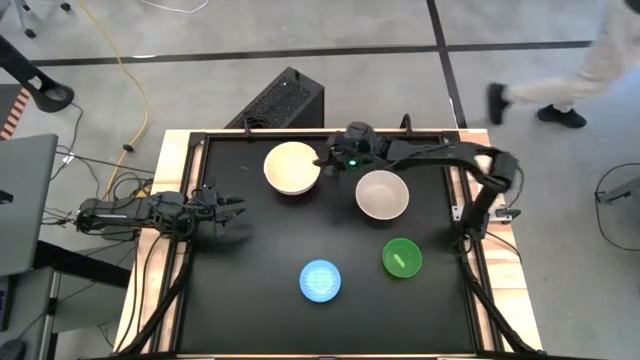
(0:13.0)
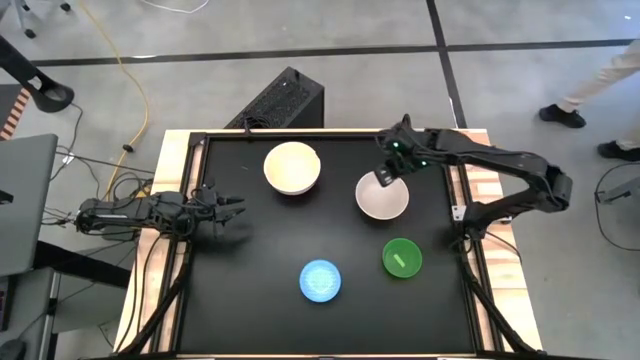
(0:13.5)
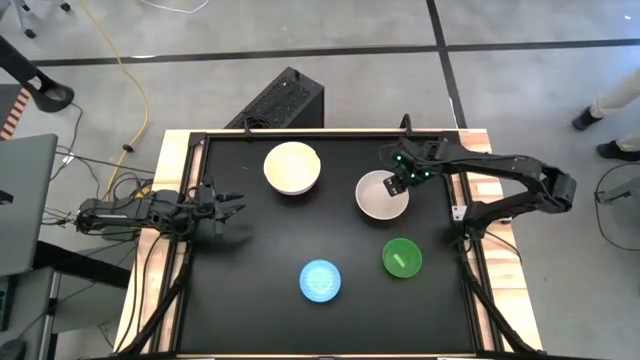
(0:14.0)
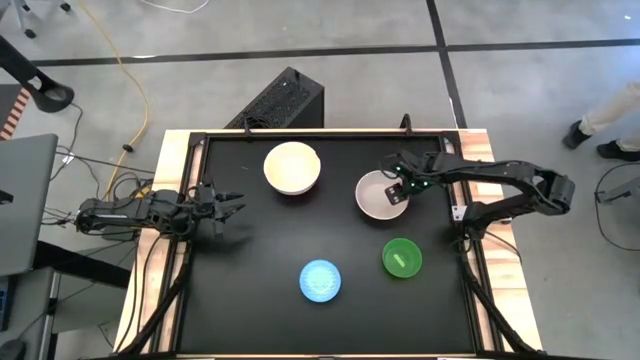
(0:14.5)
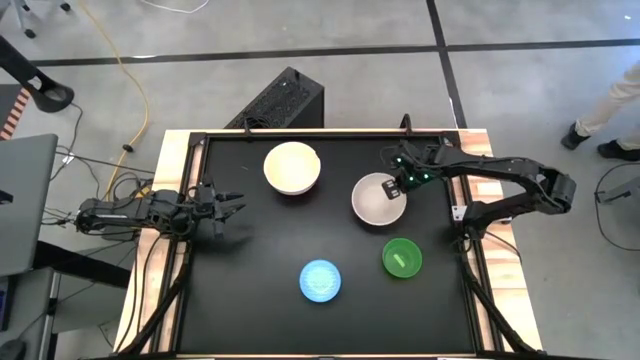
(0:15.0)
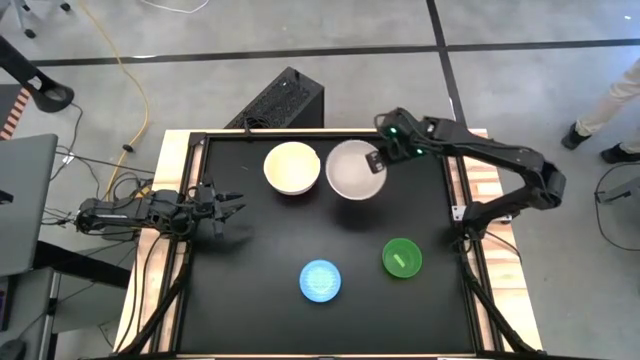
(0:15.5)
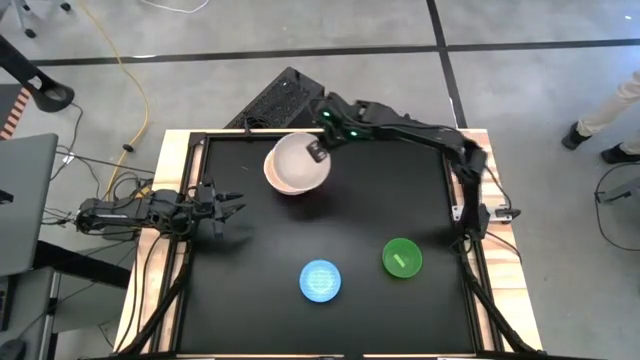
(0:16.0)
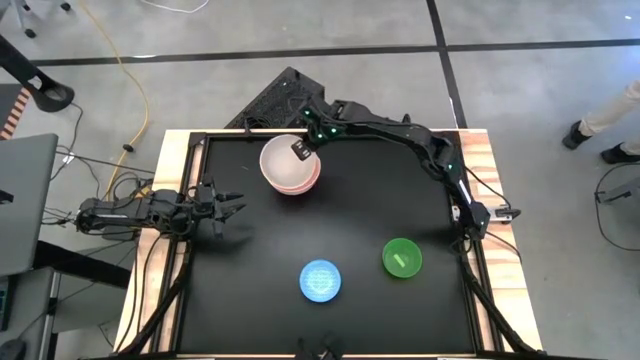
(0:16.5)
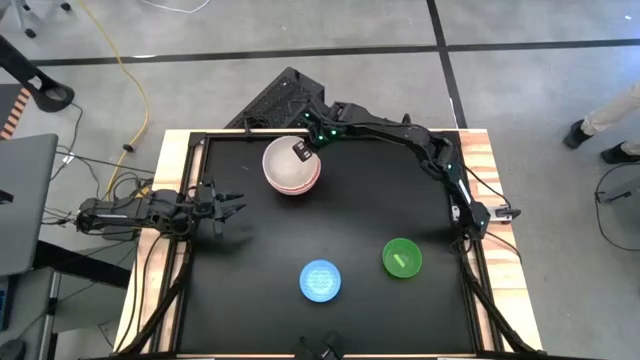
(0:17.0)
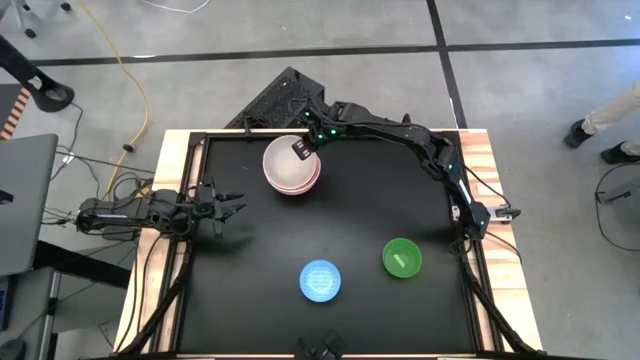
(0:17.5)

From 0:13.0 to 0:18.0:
Stack the white bowl on top of the pink bowl

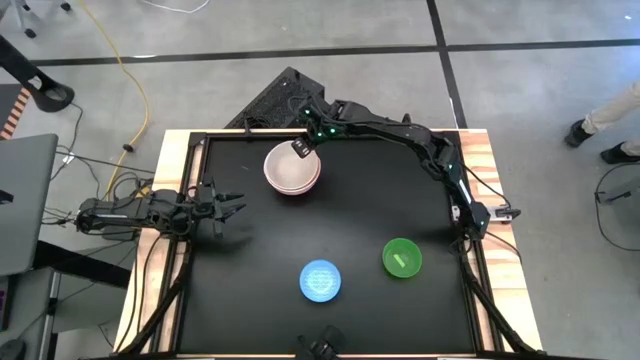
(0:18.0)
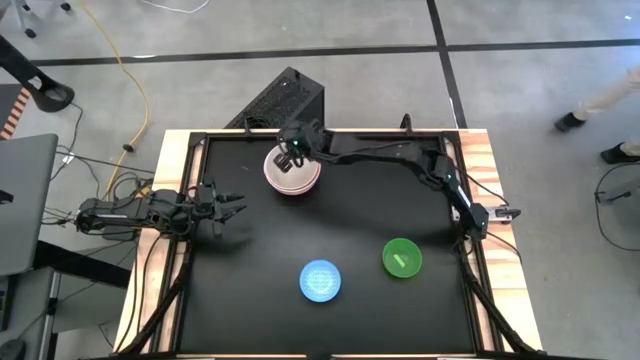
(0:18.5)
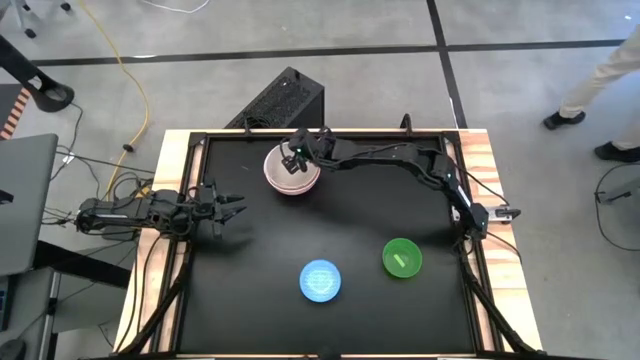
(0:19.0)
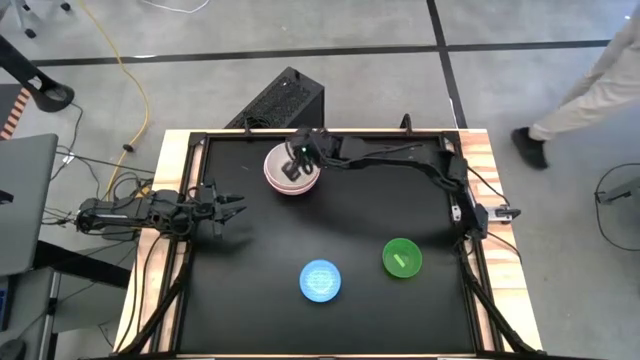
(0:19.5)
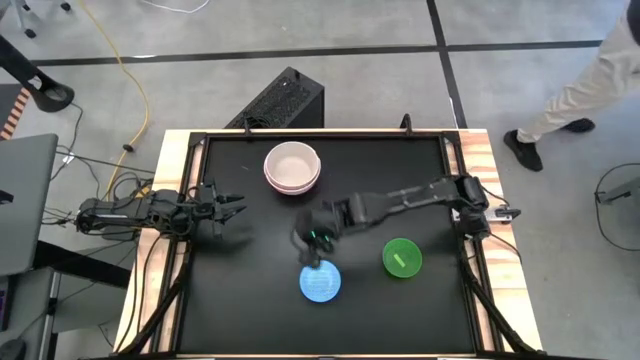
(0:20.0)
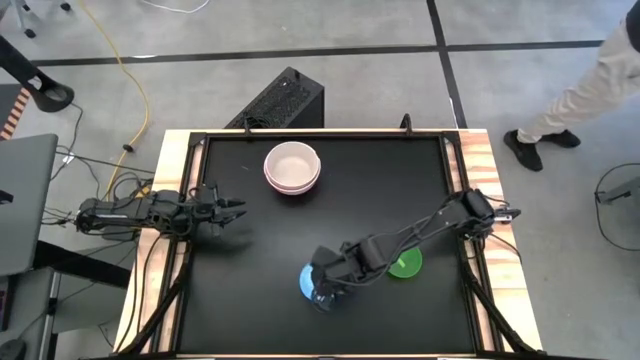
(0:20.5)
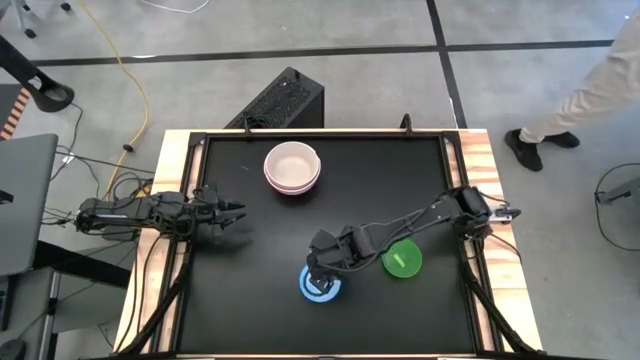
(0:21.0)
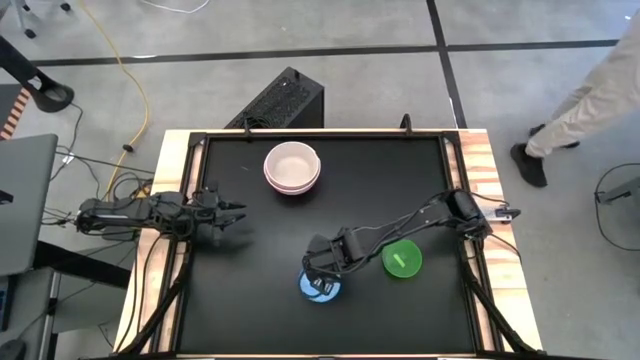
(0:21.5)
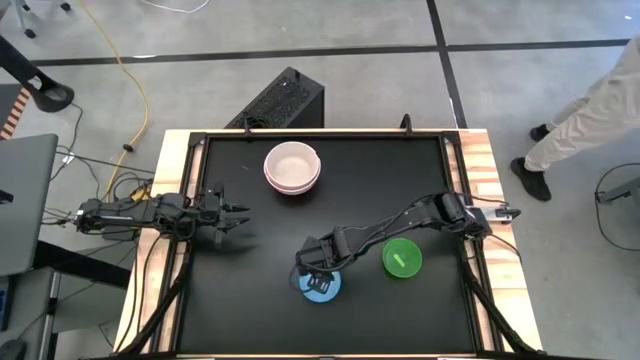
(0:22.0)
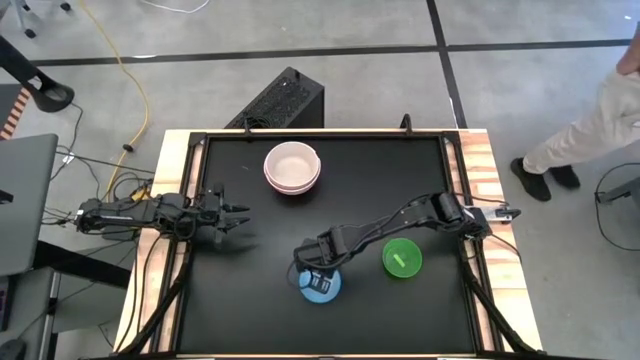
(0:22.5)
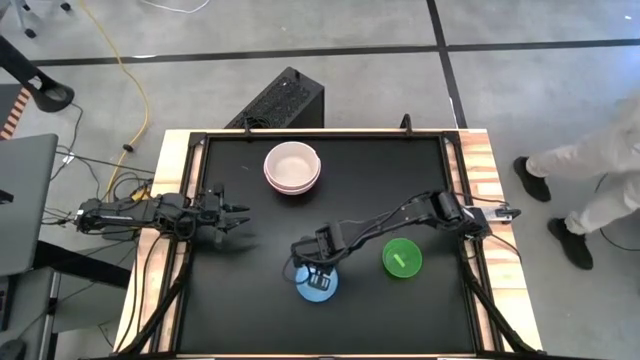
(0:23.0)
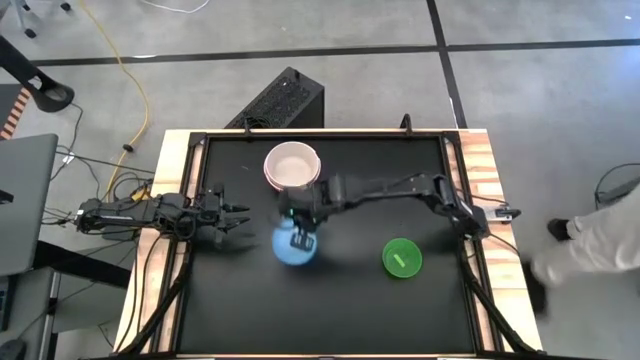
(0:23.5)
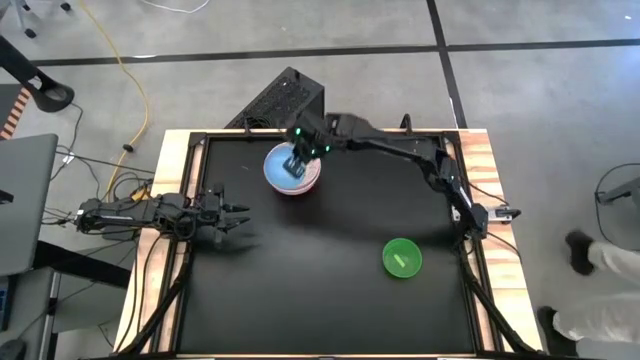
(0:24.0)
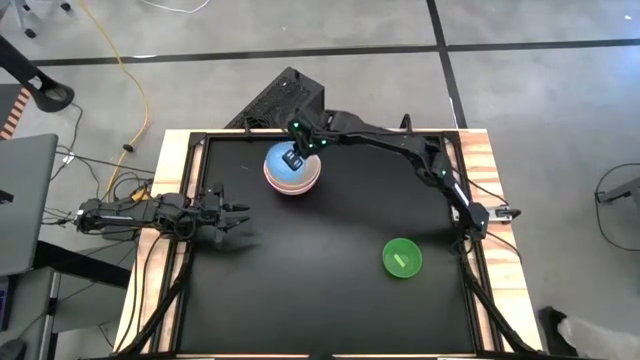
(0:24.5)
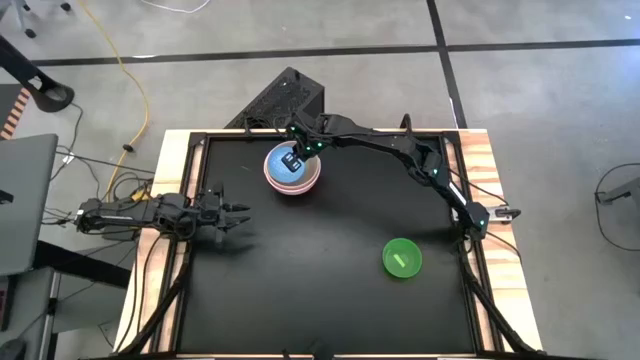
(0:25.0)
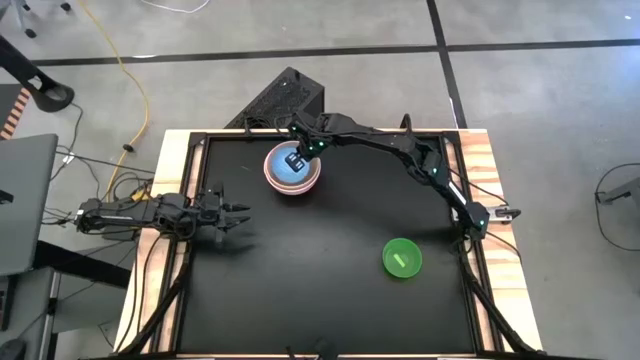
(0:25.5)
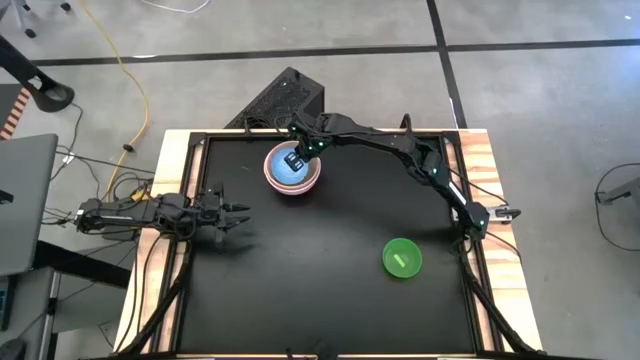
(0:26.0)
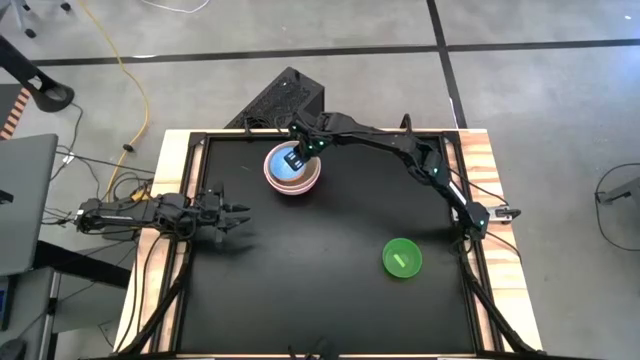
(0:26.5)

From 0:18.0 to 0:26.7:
Stack the blue patterned bowl on top of the white bowl

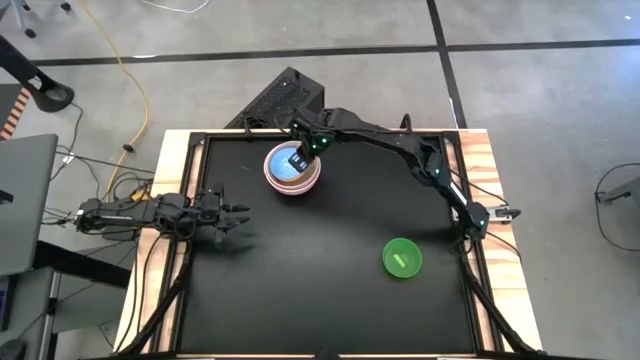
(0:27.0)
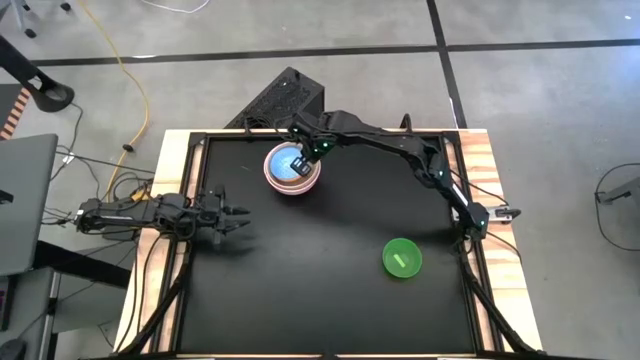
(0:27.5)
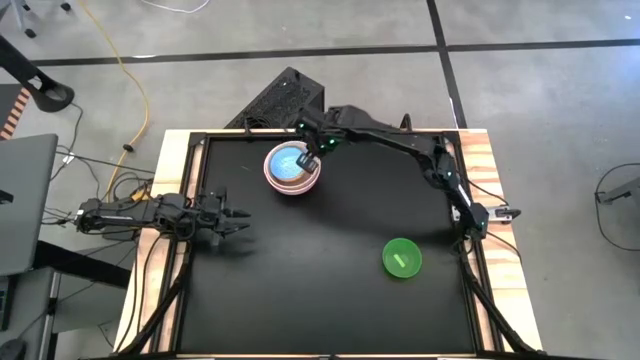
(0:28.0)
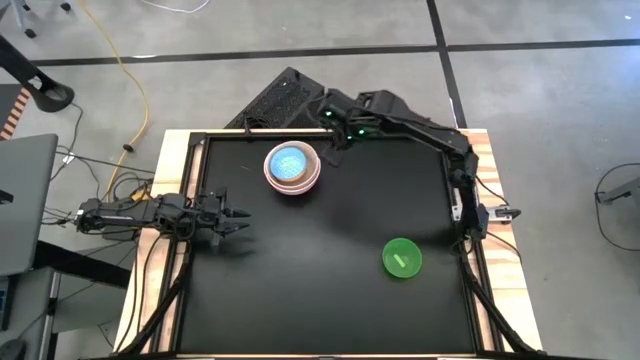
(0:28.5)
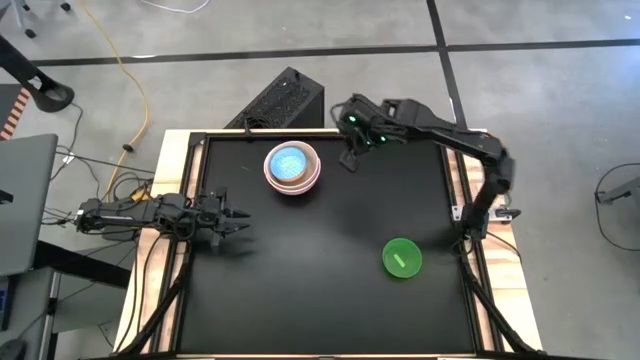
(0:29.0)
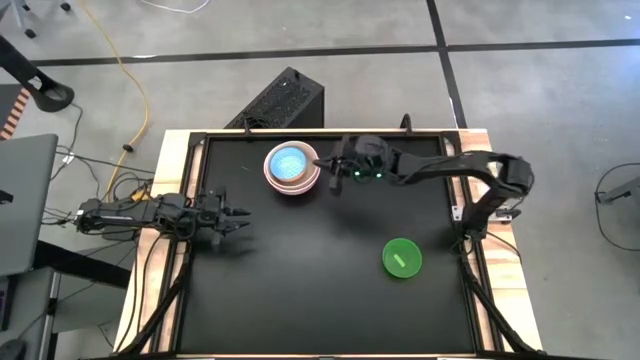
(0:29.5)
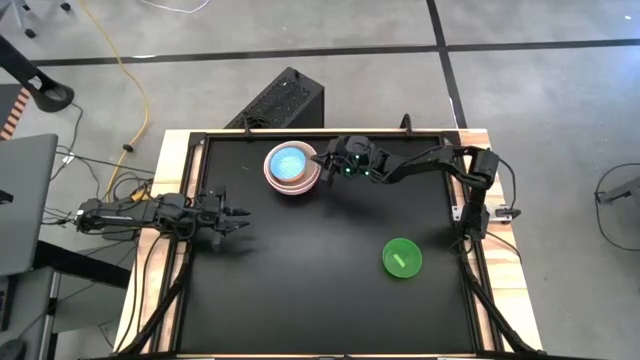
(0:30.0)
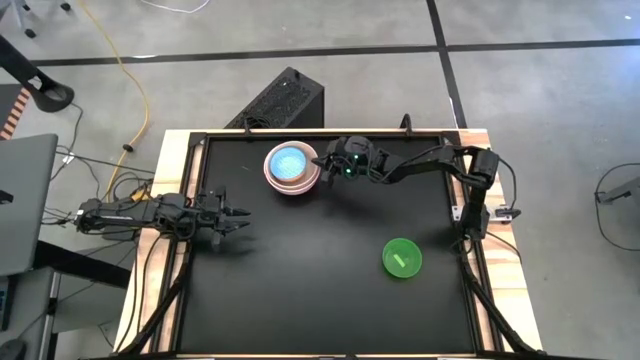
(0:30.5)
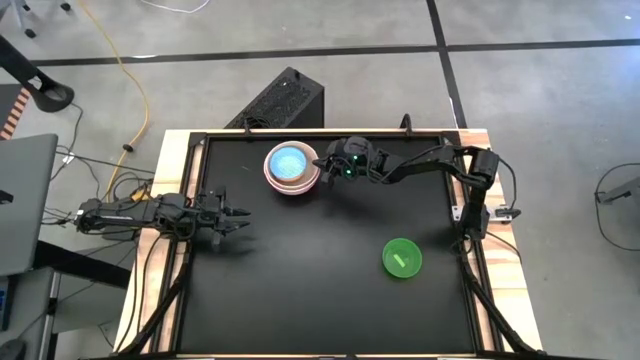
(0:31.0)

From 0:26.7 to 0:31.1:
Adjust the bowls

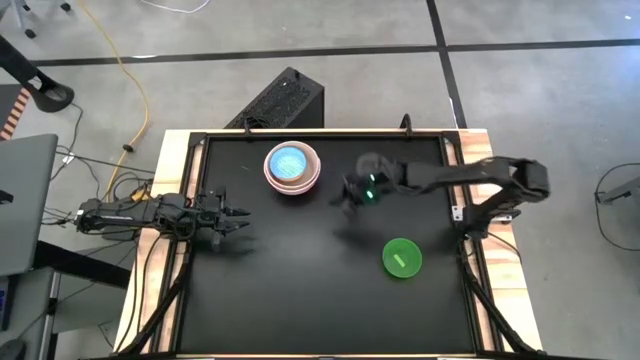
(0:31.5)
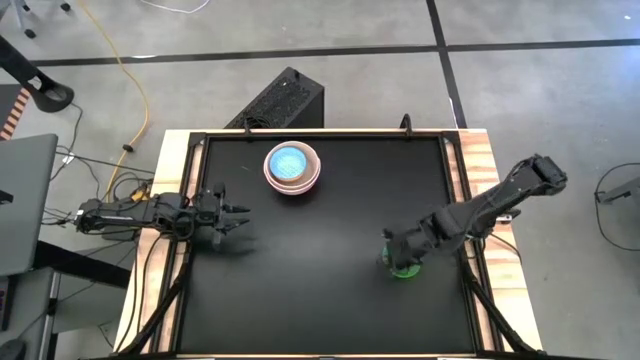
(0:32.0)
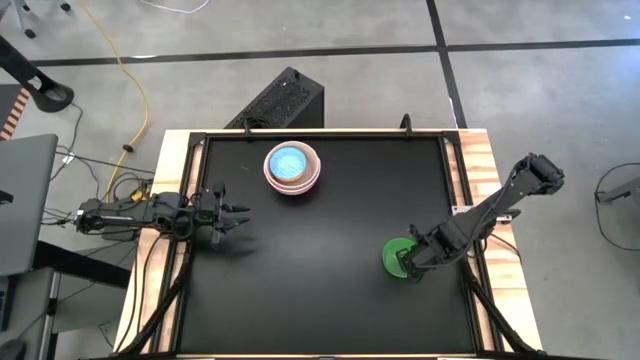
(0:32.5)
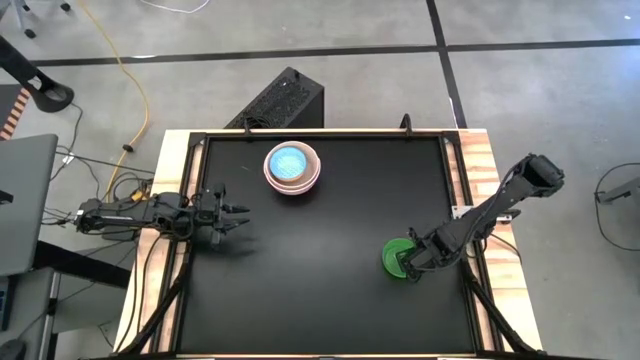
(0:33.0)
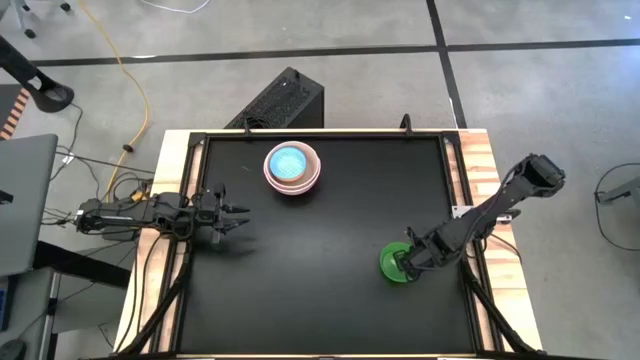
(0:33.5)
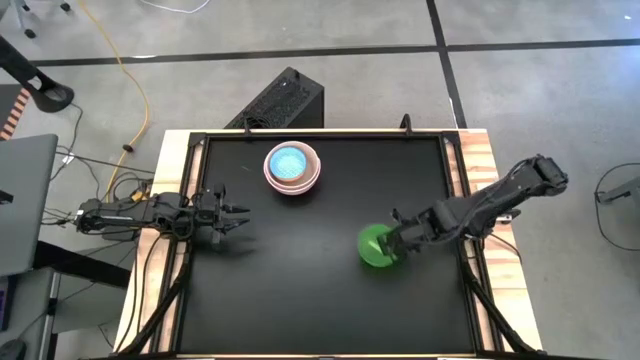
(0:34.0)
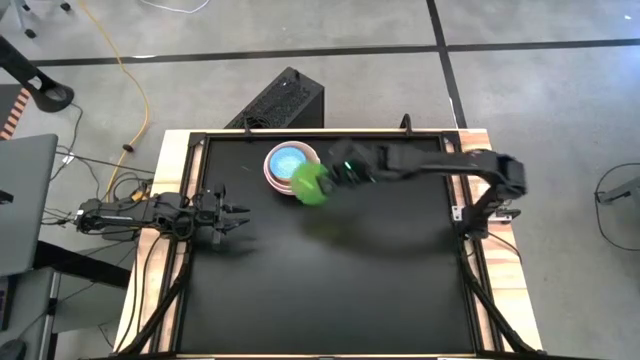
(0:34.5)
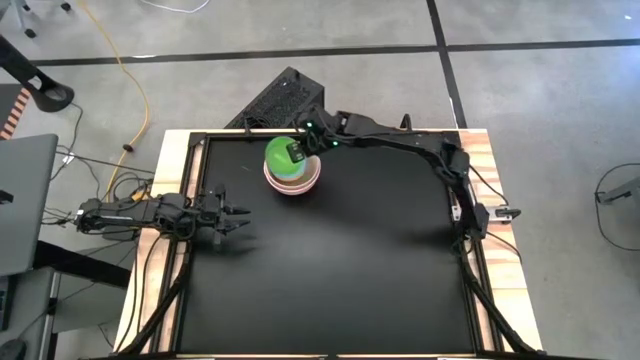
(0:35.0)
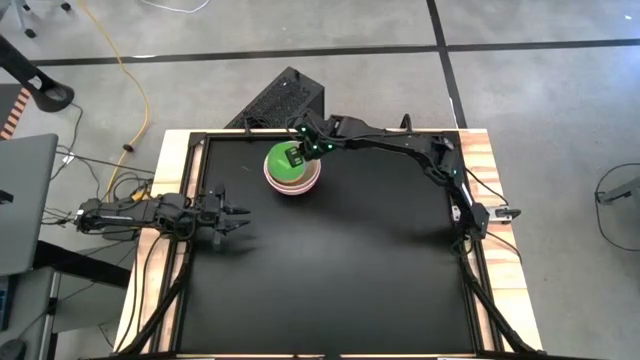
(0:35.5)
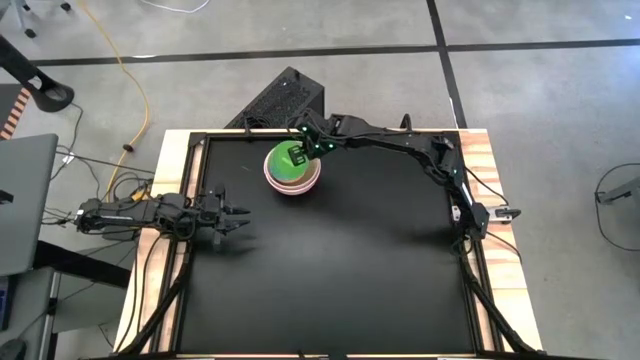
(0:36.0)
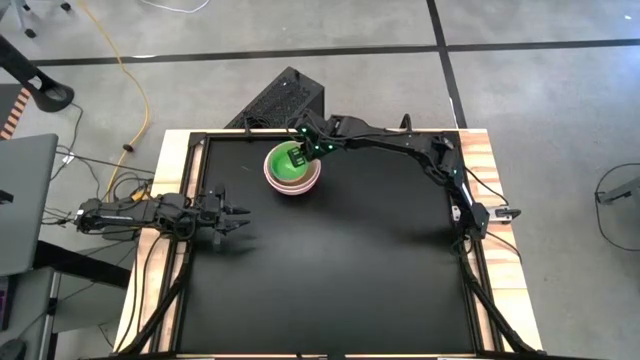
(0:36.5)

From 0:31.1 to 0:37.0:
Stack the transparent green bowl on top of the blue bowl
